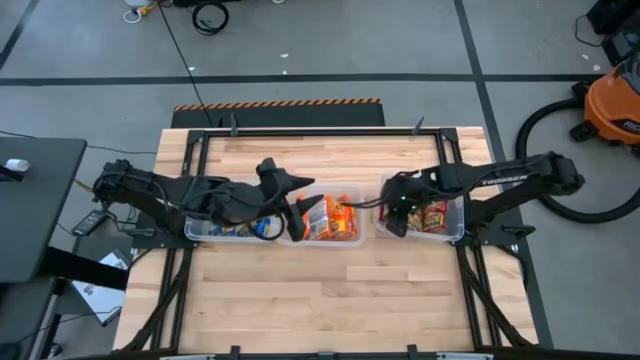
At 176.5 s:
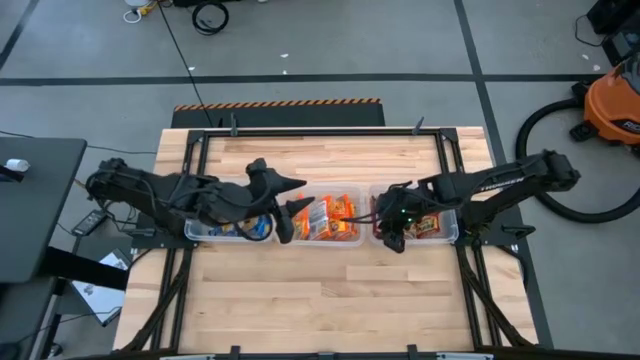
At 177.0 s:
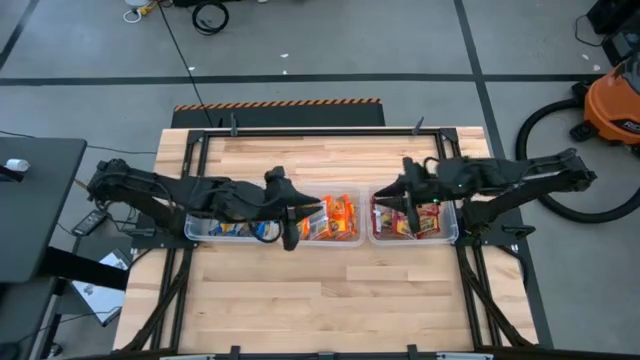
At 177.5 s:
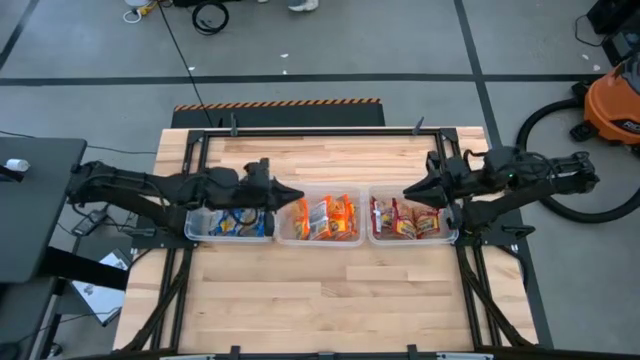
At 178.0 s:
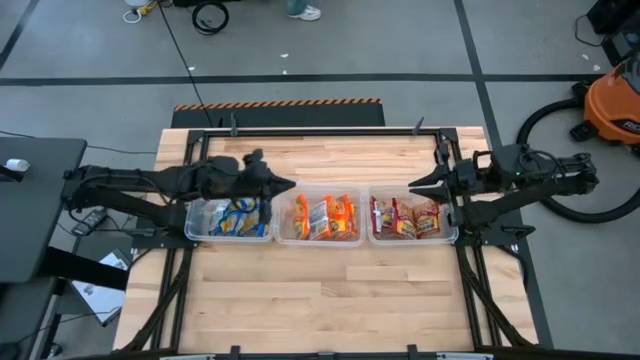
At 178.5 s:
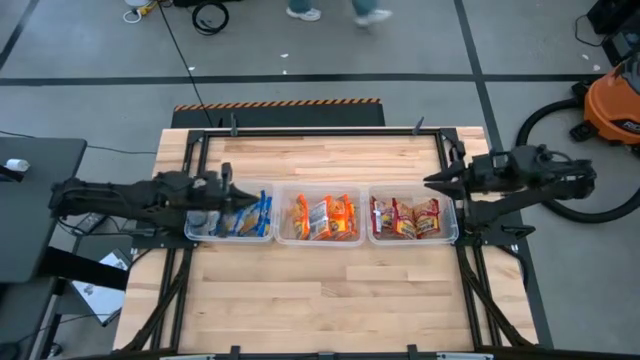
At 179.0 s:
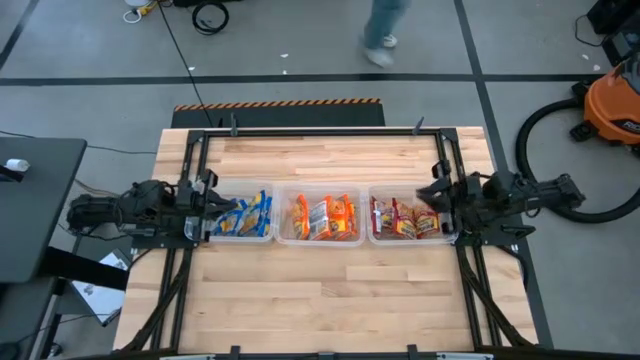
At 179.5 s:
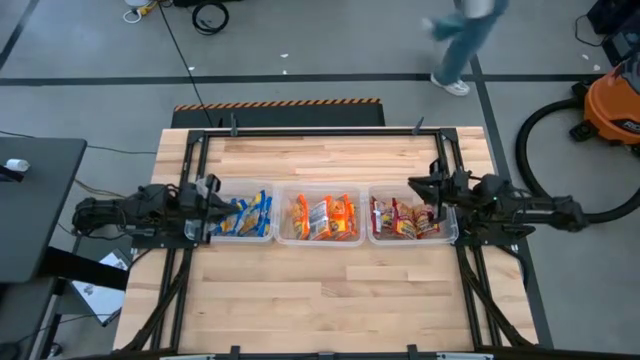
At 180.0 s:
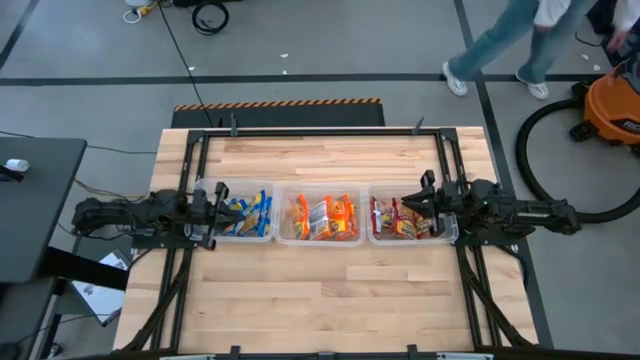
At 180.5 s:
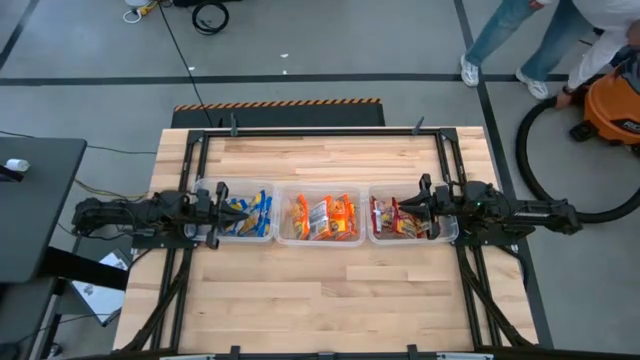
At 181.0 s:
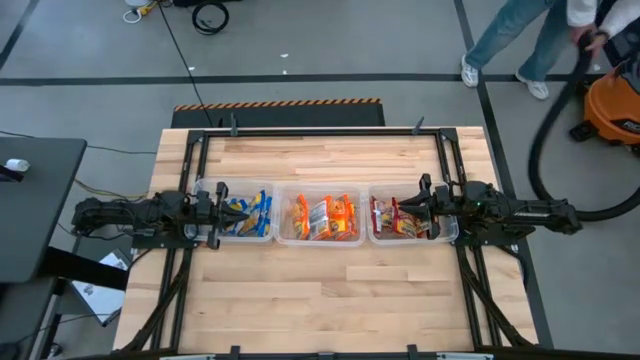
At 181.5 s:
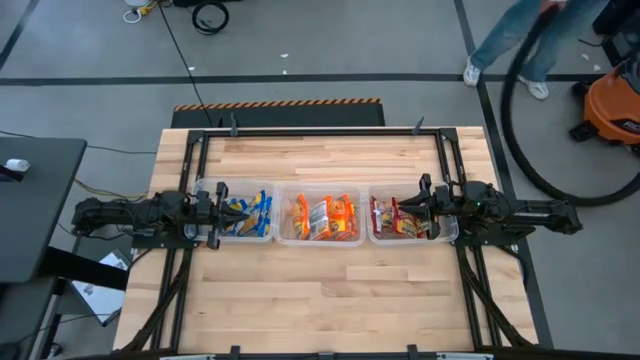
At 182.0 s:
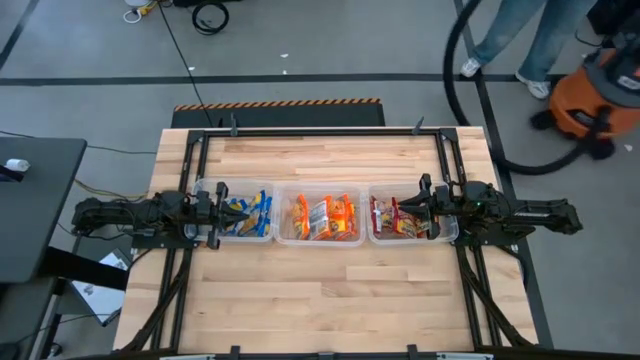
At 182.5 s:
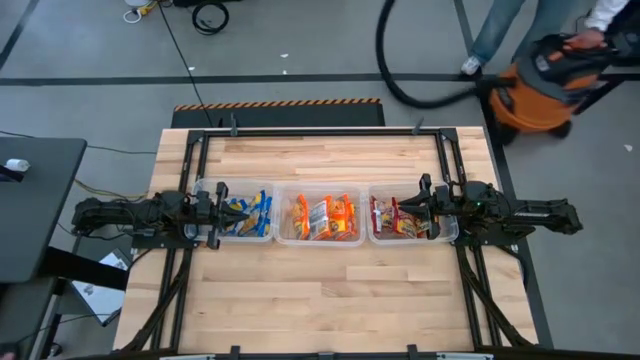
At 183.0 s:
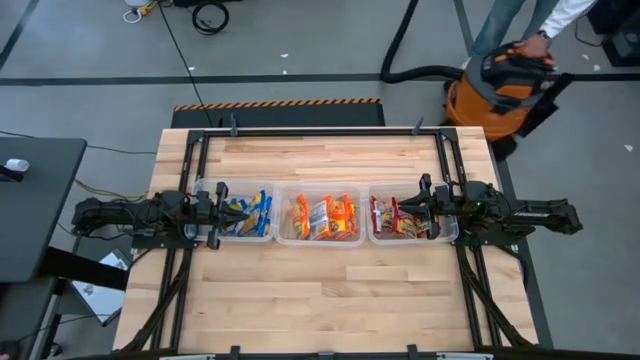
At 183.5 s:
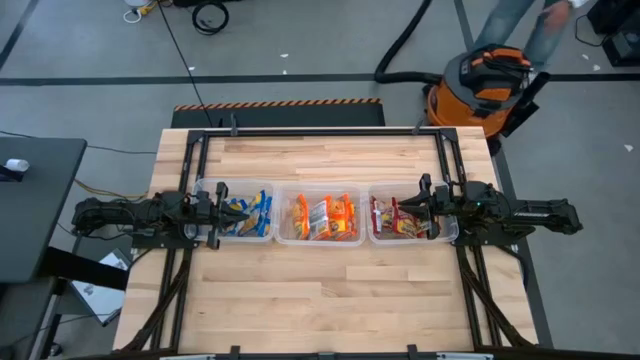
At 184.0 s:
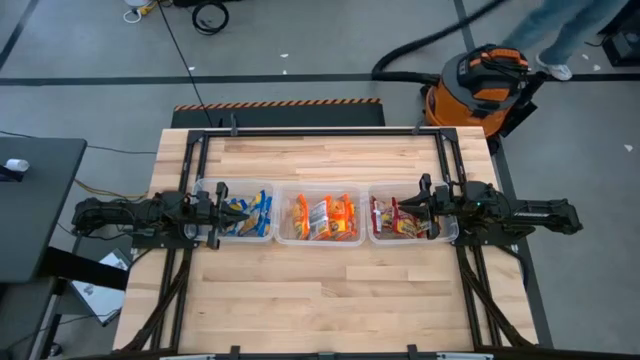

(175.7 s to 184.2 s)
Task: Sort Maruchan noodles
Return to Home Position

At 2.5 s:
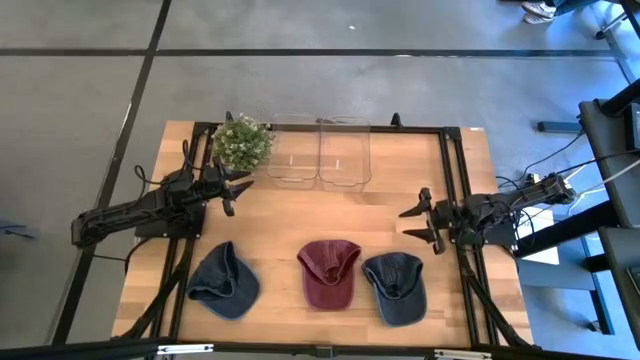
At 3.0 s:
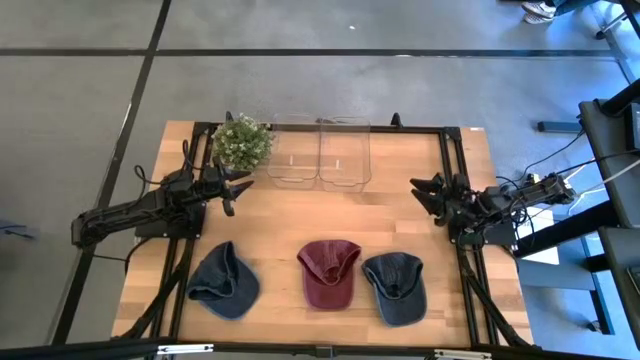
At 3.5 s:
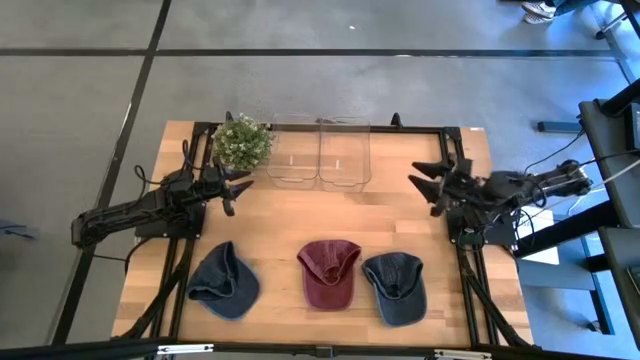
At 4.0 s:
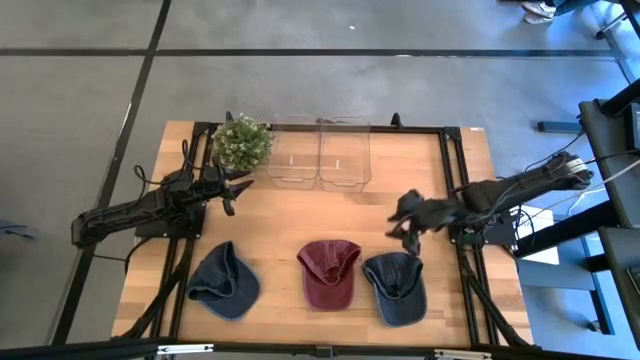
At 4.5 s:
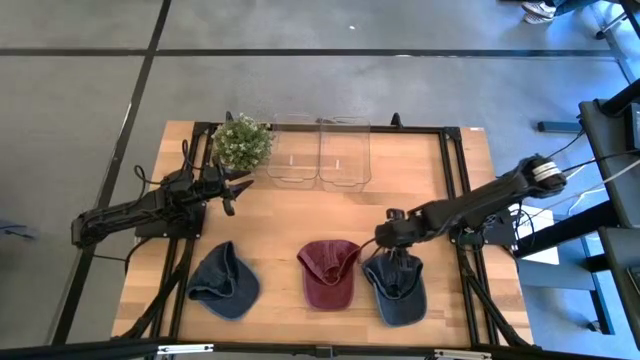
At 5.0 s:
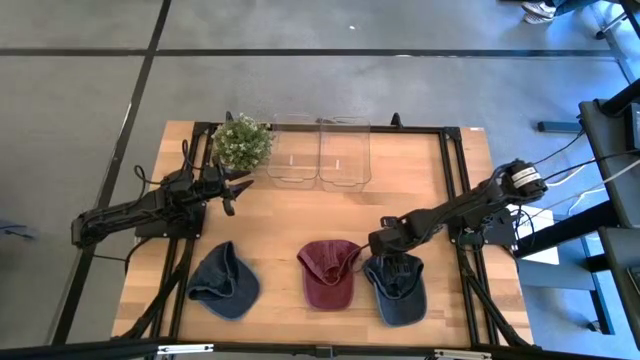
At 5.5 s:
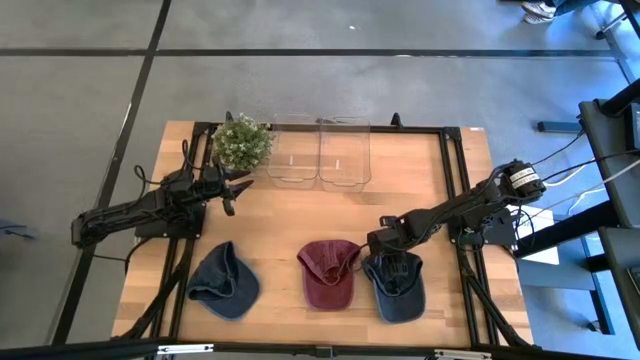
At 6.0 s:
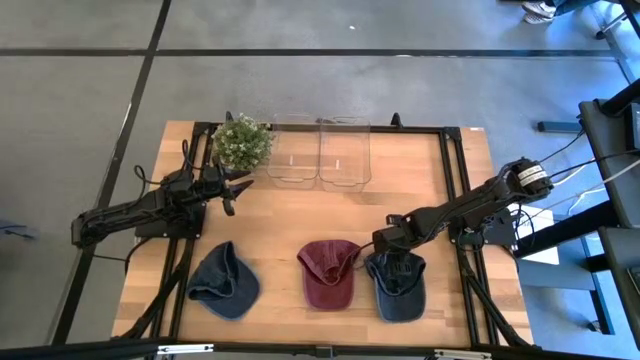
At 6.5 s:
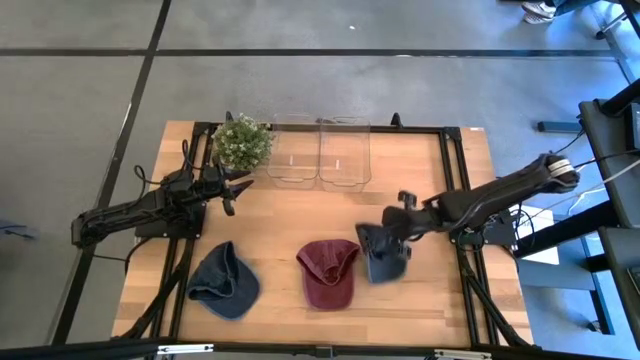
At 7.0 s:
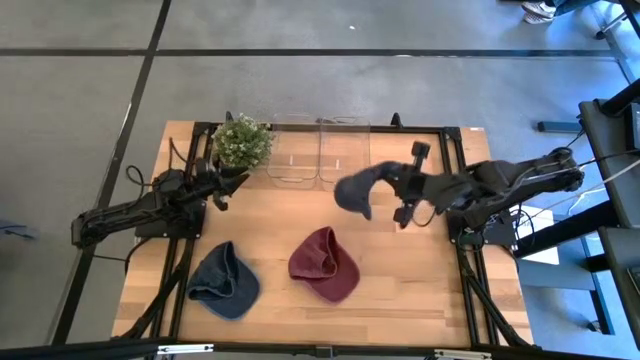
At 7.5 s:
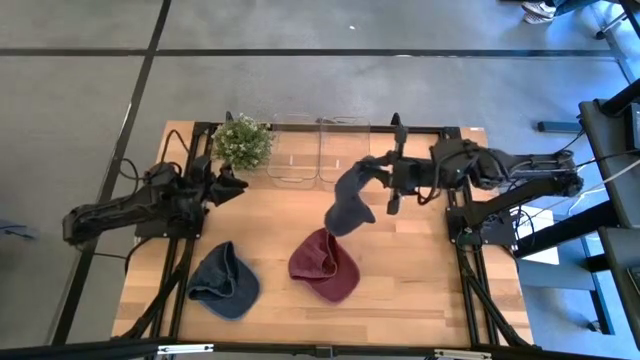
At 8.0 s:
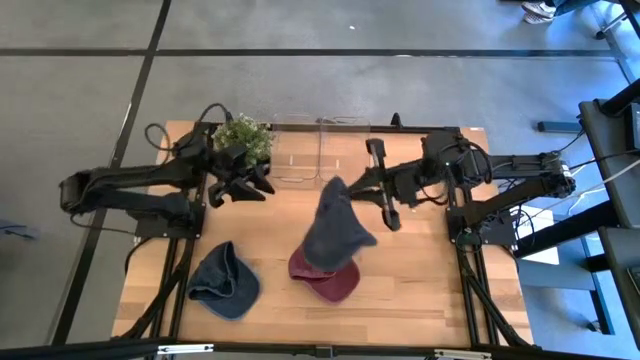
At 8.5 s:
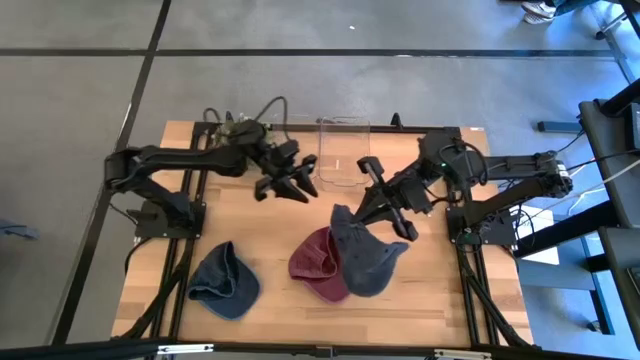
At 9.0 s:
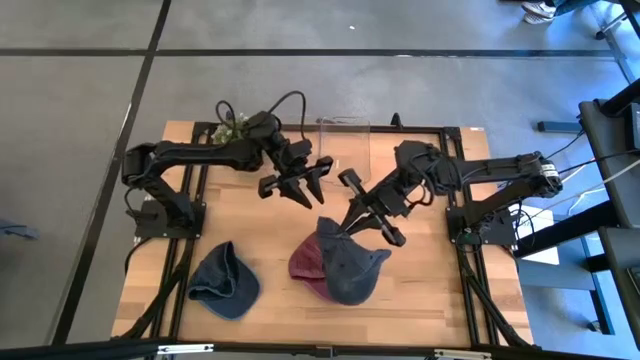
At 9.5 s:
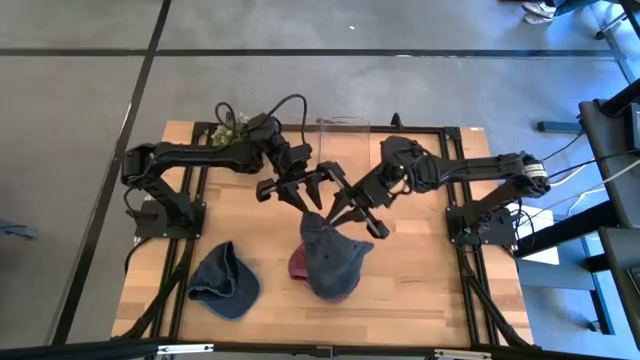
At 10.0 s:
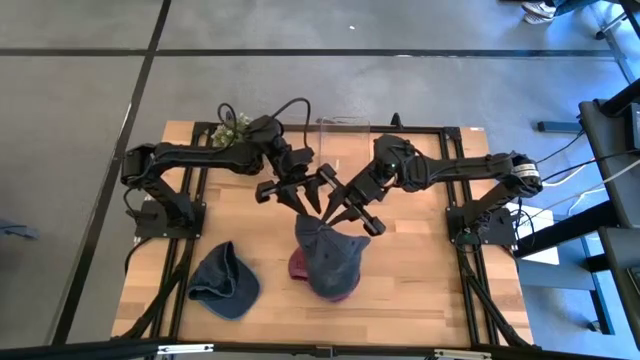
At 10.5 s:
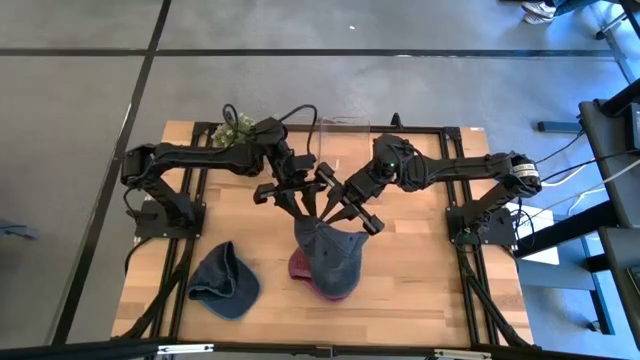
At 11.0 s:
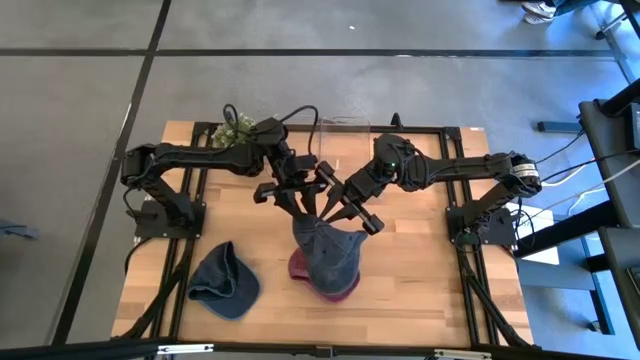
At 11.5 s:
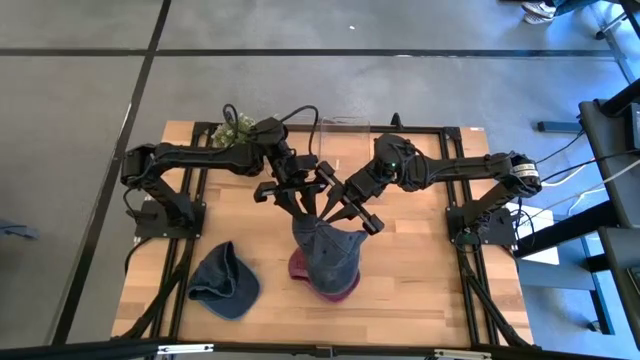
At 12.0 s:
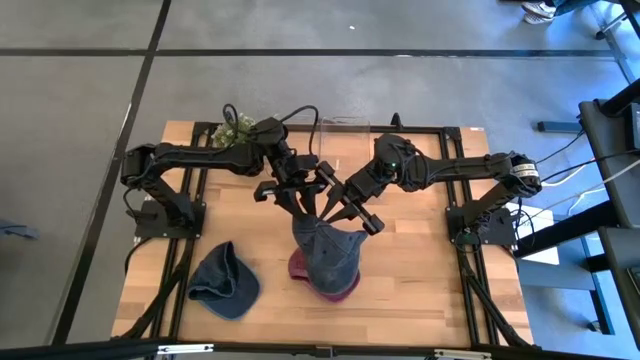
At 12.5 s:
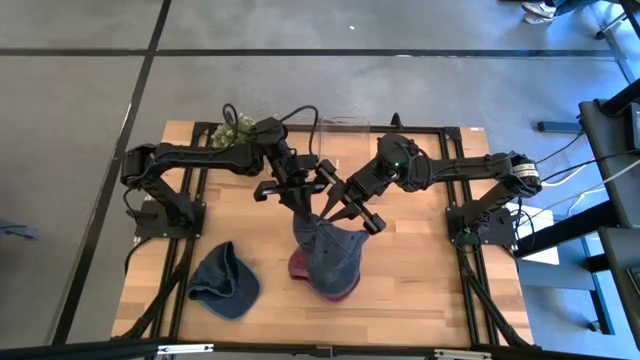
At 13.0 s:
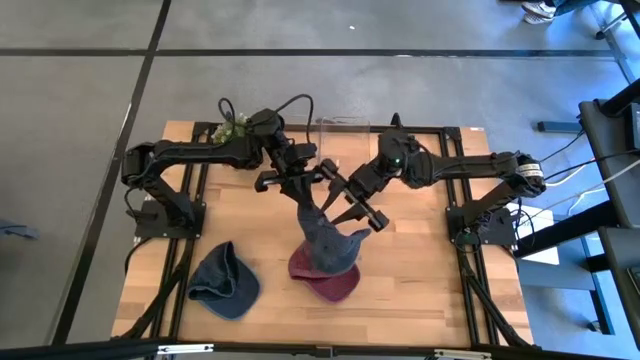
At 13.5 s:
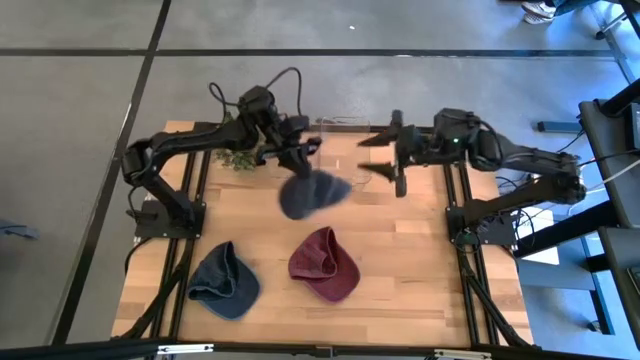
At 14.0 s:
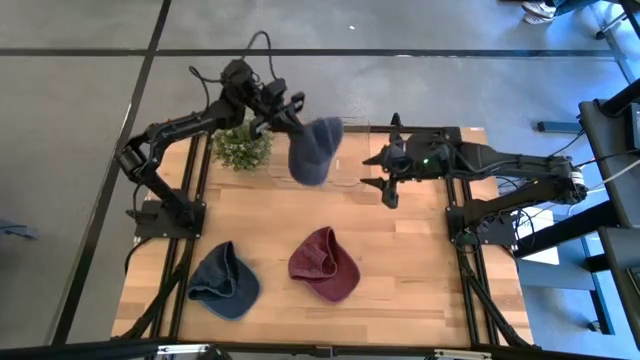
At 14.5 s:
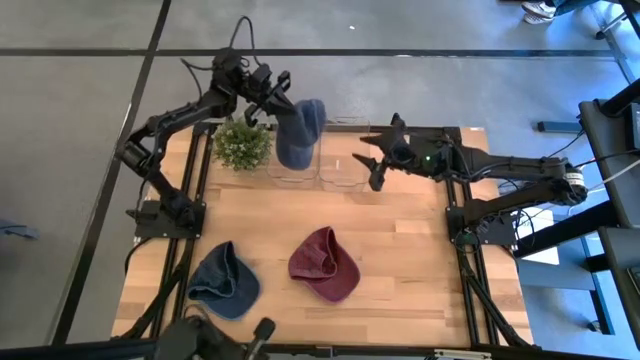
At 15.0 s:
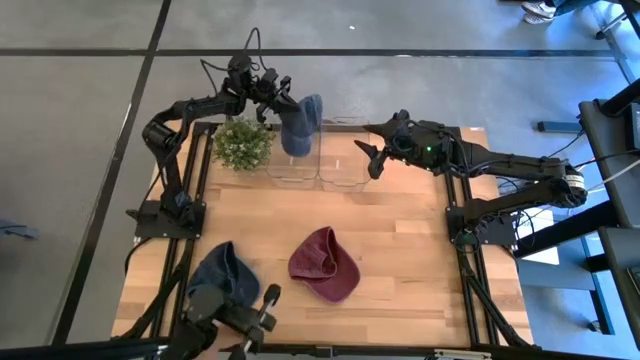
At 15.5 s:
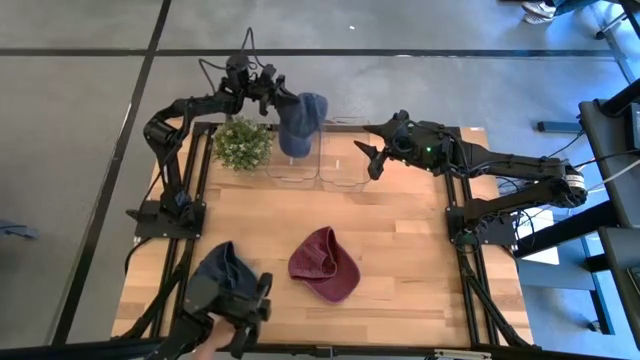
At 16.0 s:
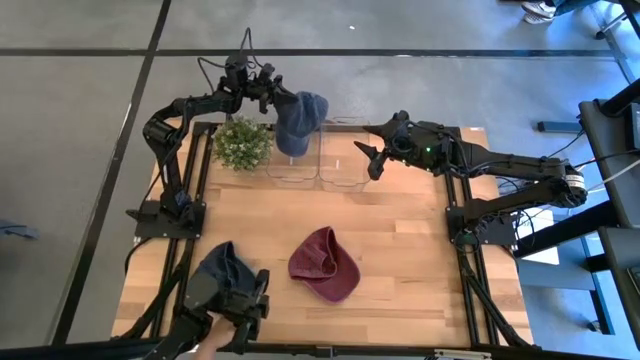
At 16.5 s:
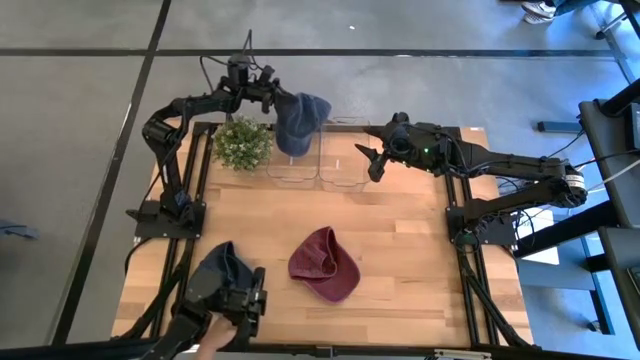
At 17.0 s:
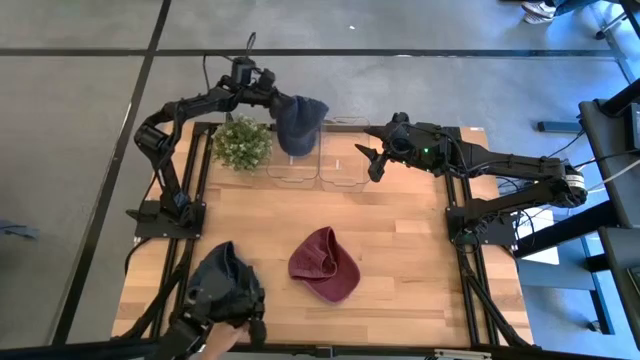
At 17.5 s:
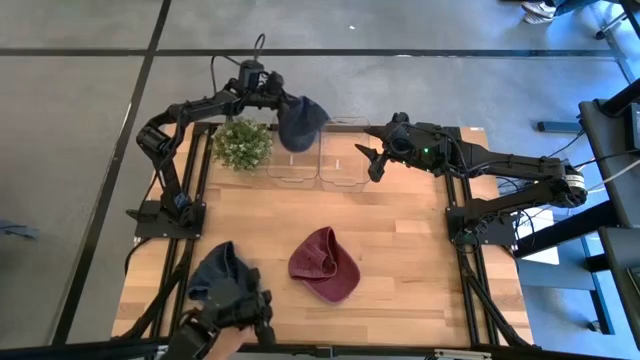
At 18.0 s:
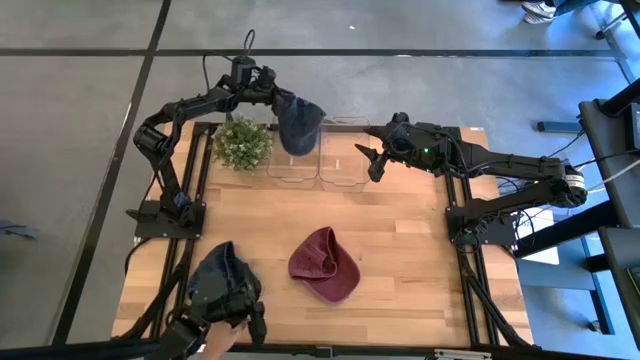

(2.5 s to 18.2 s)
Task: Pick & Place hat
Put the right black cap into the left transparent bin
